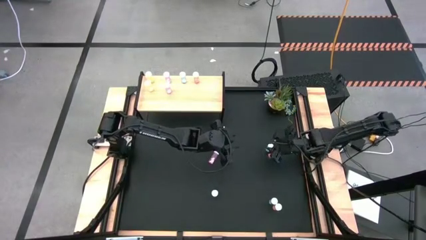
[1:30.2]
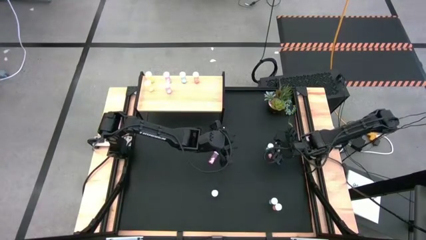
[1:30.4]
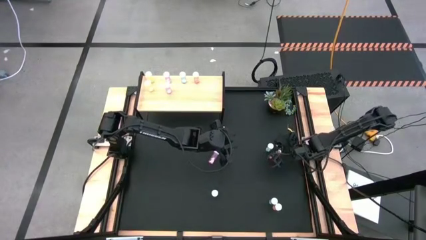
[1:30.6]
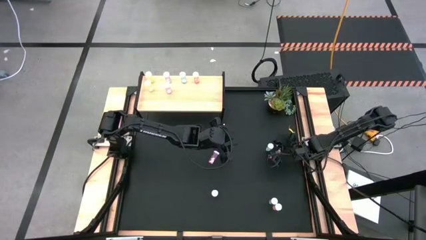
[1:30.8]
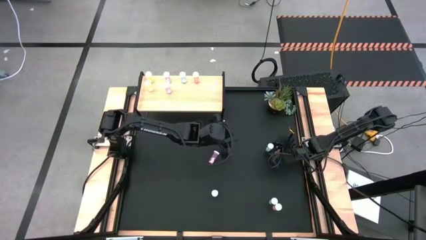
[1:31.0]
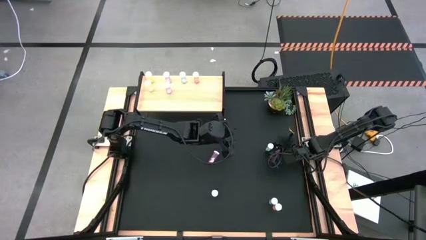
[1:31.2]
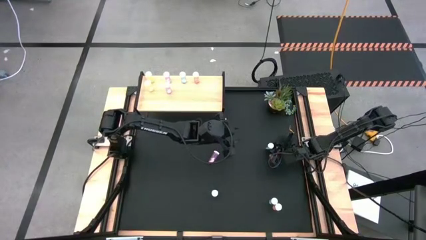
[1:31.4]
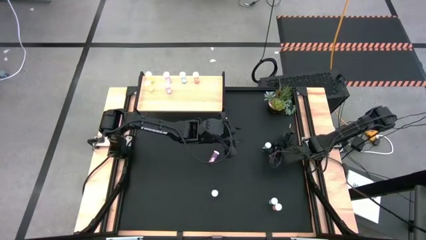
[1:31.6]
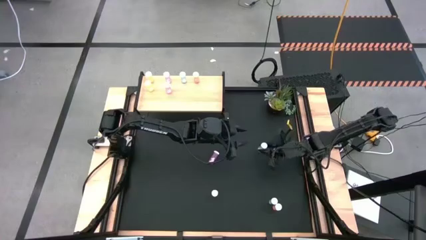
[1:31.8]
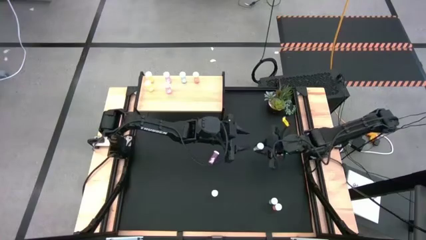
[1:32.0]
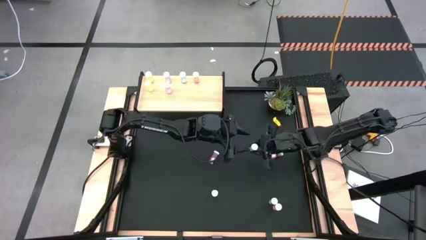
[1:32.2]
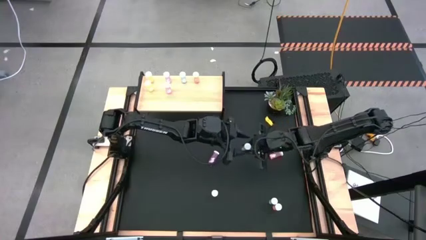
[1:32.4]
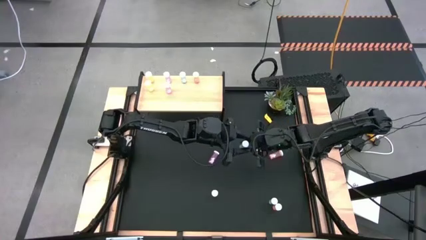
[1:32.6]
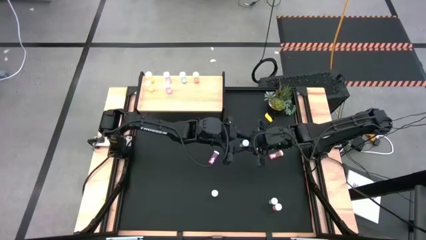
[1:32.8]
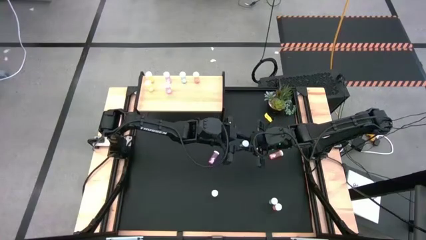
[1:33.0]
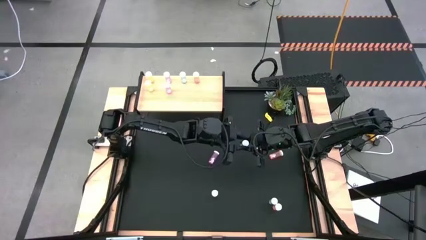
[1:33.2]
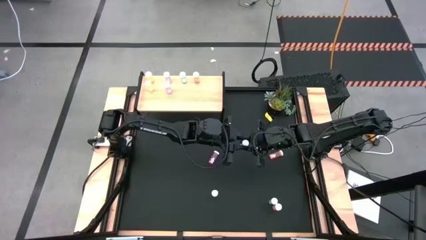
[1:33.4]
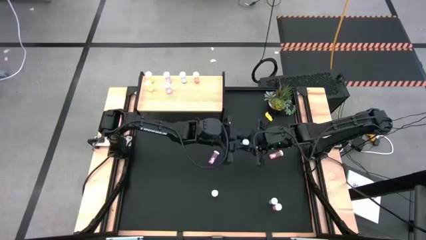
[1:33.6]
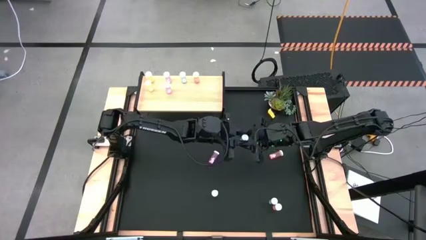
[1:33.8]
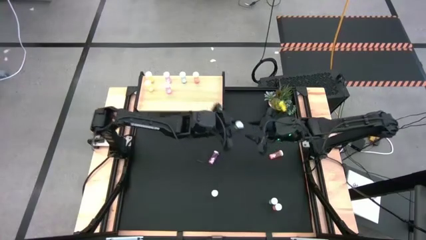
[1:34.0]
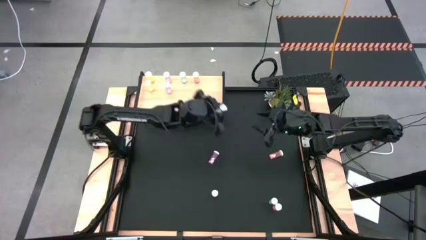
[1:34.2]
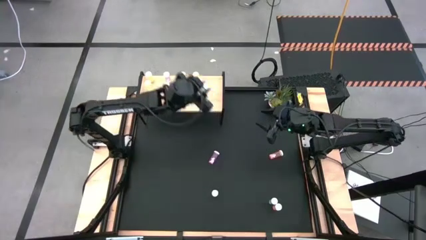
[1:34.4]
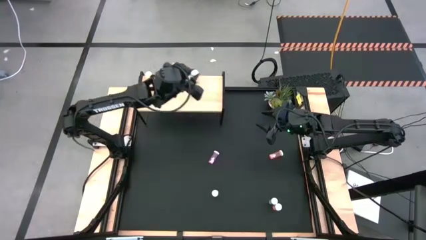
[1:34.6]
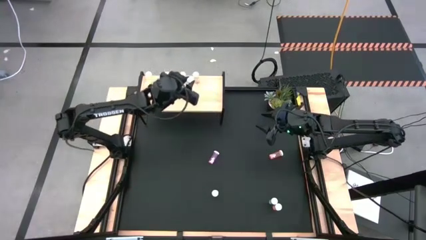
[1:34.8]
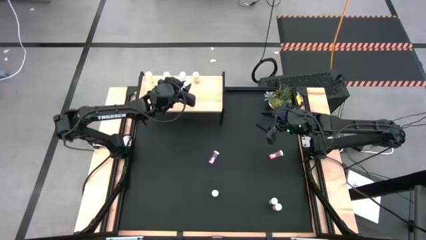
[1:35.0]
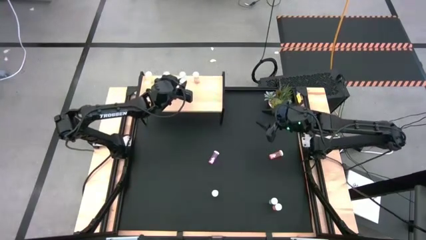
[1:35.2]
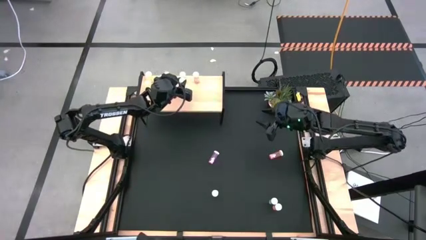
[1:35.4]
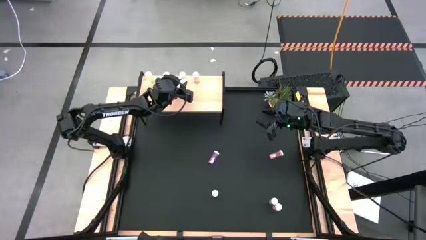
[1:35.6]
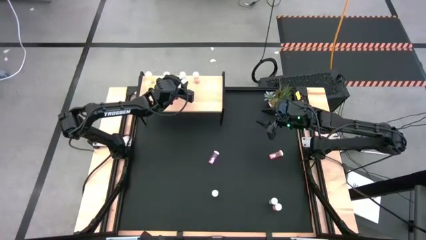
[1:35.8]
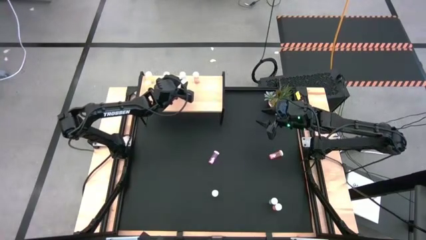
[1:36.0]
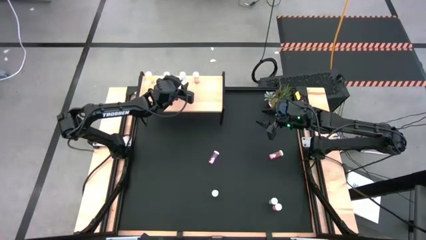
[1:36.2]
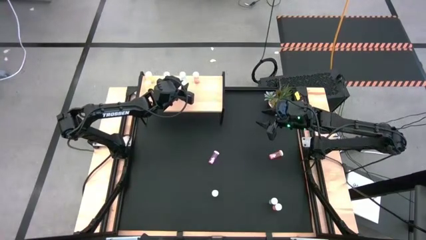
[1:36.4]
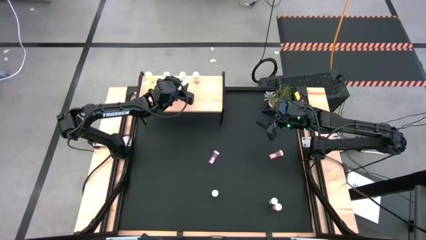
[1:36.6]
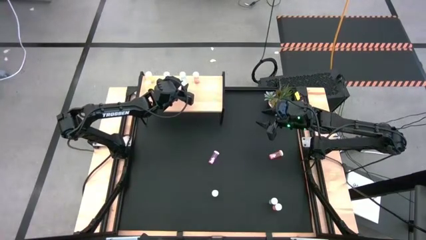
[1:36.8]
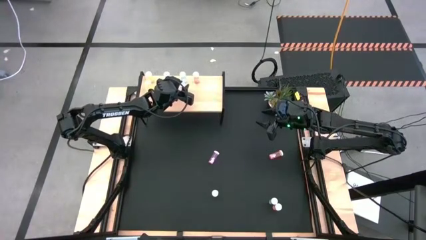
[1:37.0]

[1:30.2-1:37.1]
Task: Pick and place medicine bottles onto shelf by color
Put the top blue medicine bottle aligned with the other blue medicine bottle on the shelf

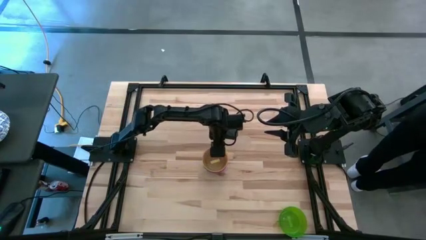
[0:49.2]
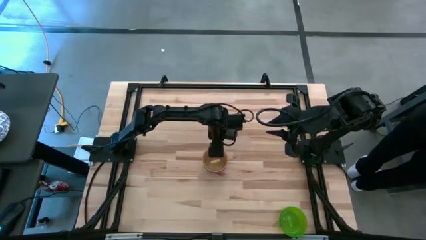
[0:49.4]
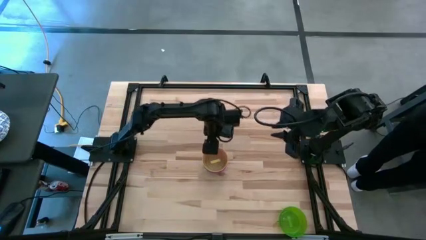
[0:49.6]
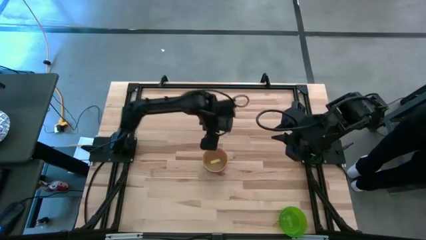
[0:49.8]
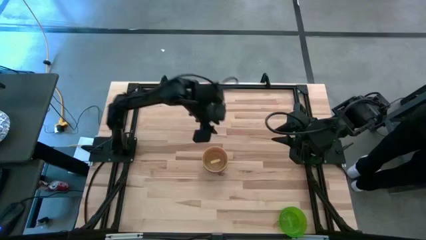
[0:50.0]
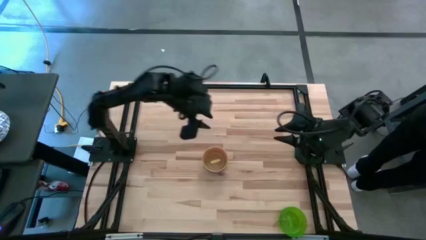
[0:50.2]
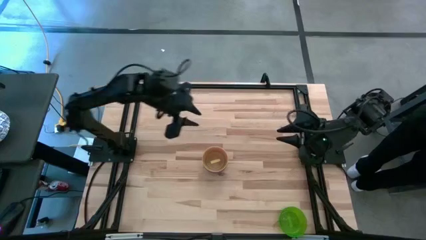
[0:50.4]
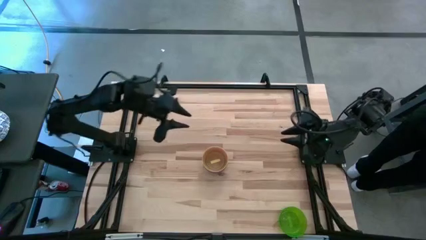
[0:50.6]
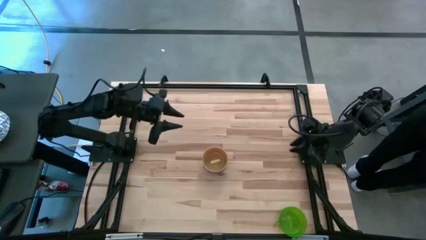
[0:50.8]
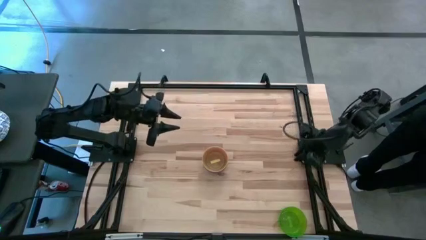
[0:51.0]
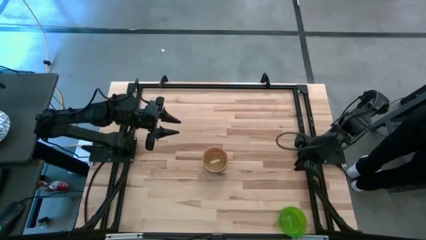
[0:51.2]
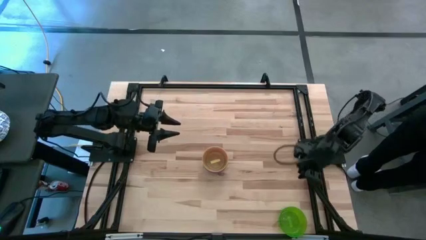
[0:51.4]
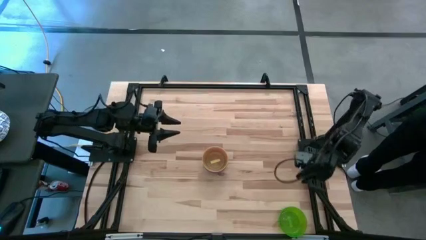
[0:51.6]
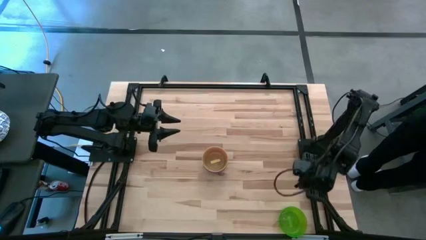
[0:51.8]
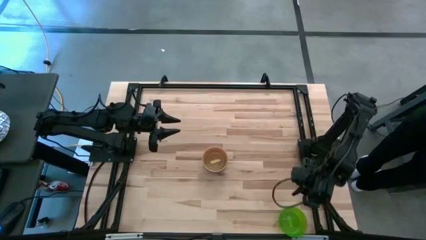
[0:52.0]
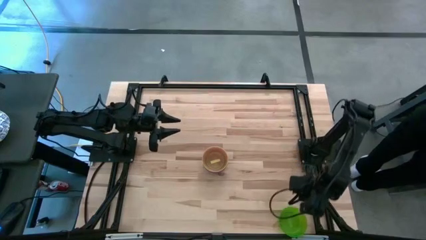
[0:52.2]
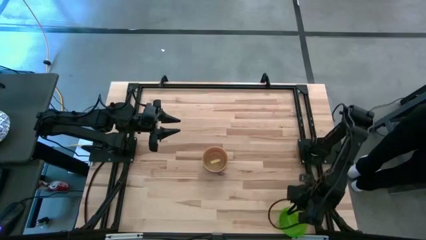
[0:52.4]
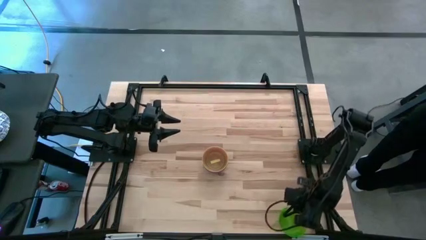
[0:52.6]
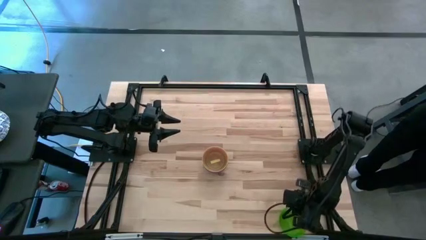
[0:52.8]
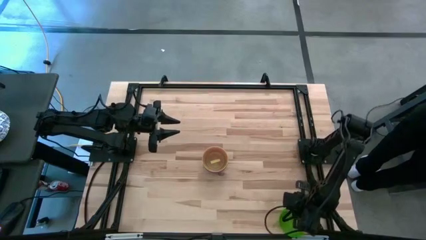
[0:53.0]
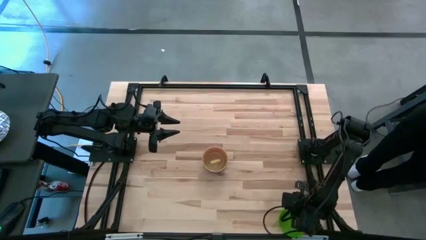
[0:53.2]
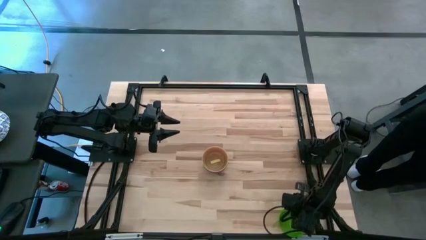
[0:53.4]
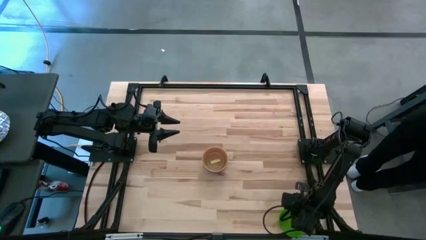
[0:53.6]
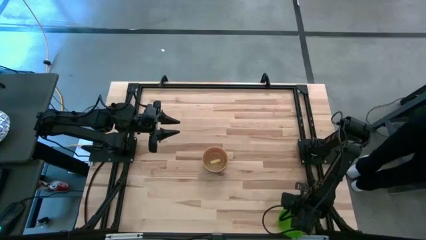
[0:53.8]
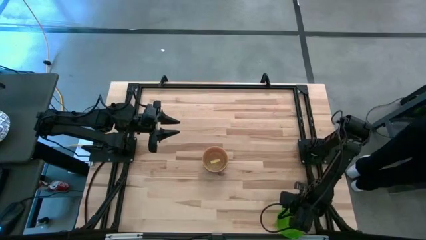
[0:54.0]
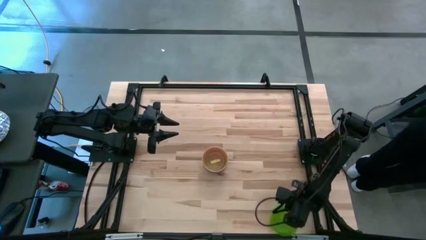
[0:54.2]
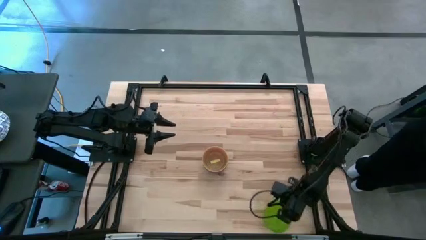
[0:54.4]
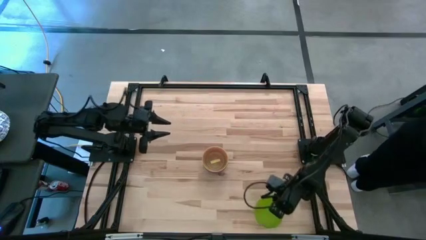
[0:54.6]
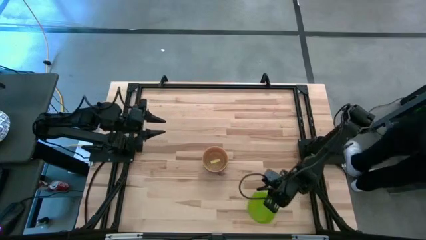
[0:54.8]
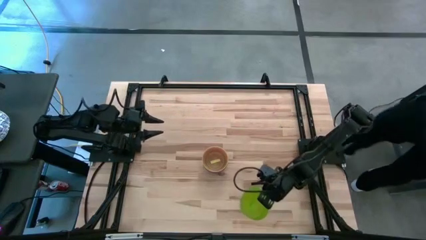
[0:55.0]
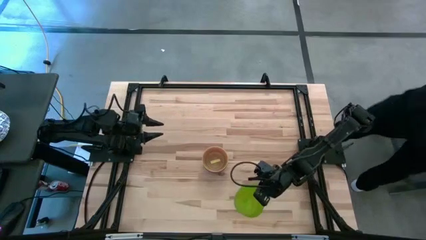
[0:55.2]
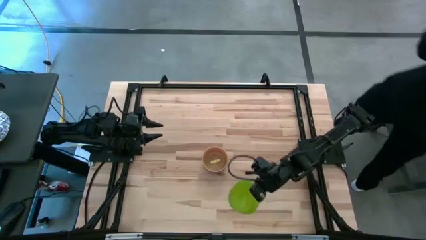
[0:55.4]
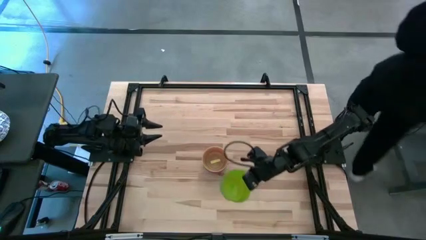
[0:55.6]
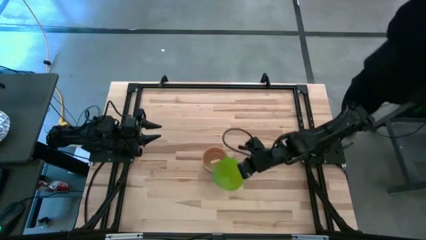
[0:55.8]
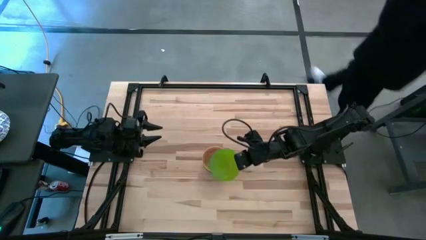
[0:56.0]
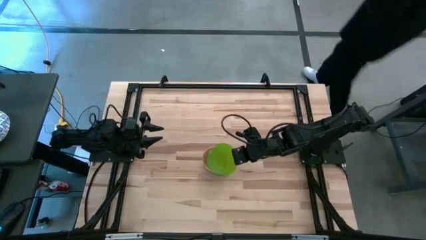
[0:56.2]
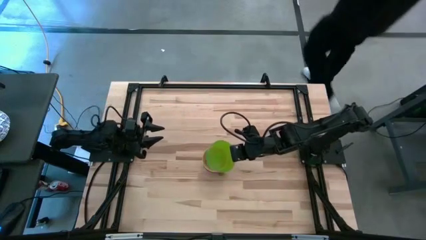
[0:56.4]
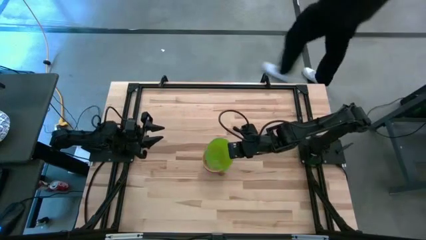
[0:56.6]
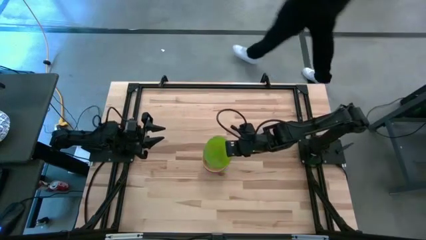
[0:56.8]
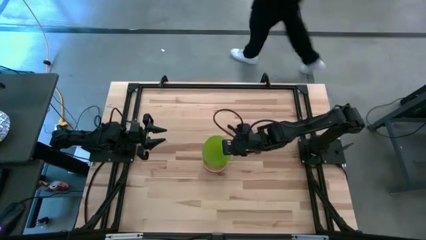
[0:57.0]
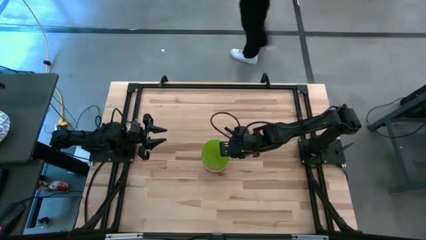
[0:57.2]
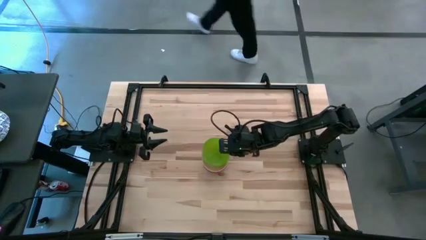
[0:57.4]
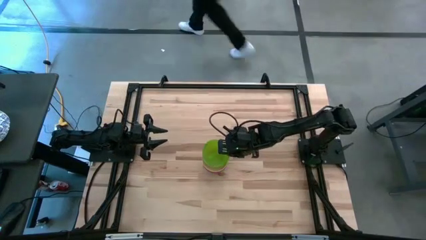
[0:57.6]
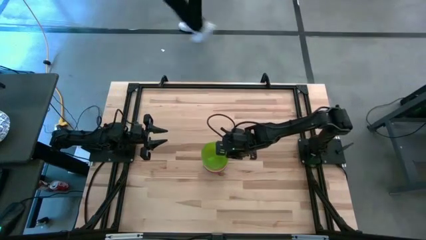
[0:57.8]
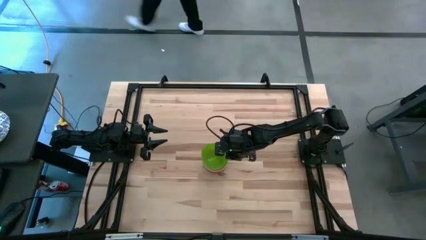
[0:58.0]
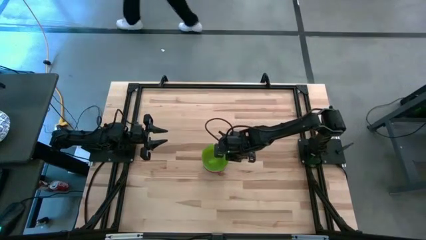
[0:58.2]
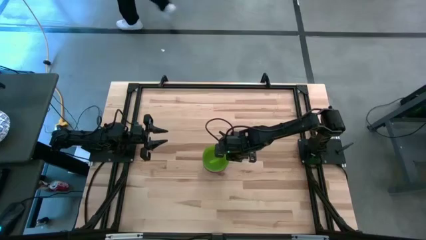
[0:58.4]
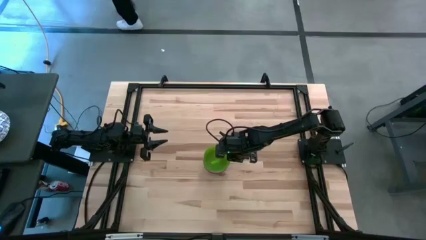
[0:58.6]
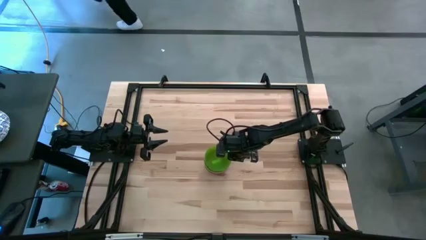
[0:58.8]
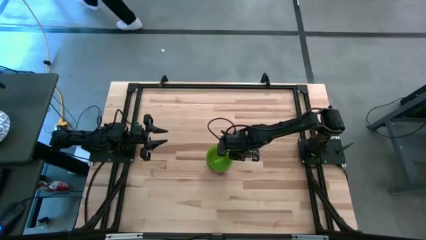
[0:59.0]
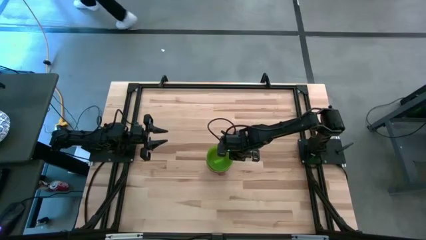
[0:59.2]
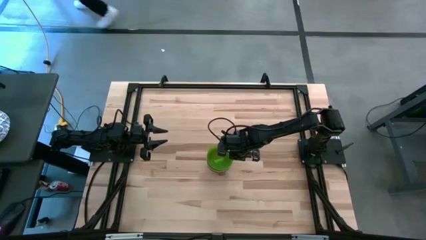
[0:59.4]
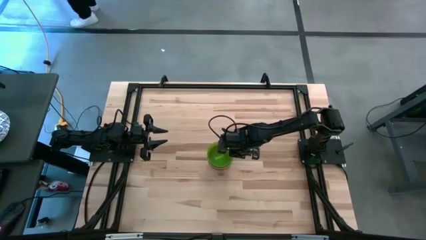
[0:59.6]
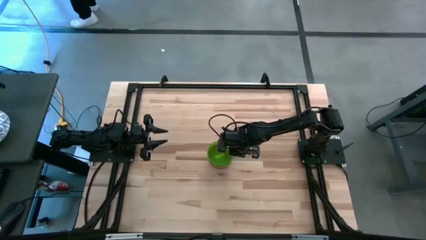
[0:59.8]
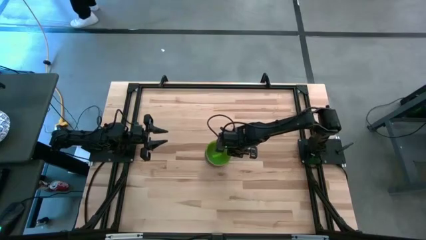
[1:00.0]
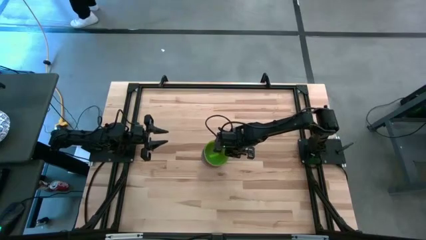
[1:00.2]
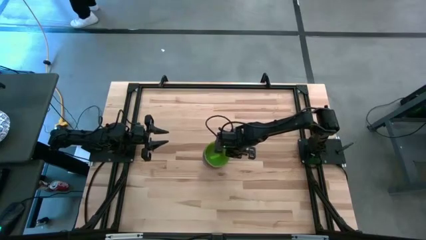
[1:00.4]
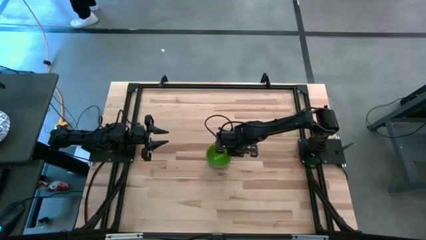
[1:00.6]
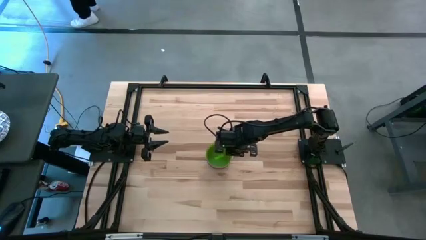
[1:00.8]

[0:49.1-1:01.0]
Task: Nest bowls inside each other
Stack the green bowl on top of the yellow bowl
